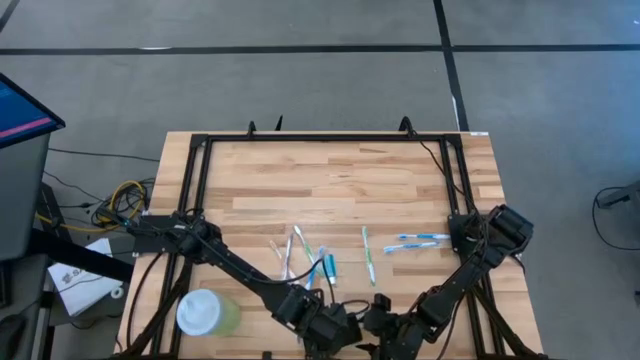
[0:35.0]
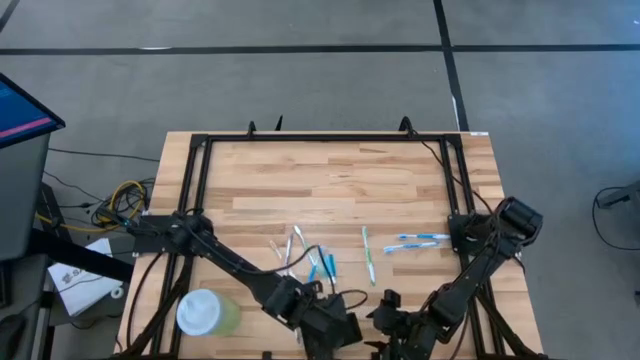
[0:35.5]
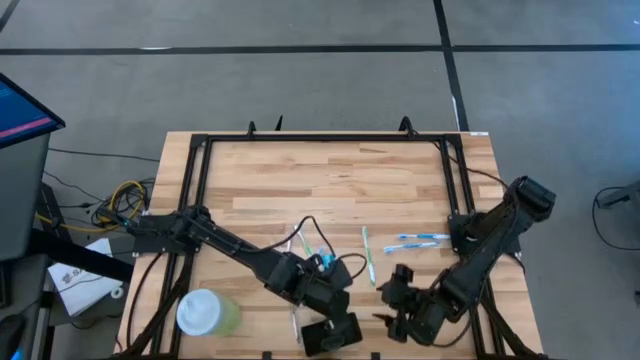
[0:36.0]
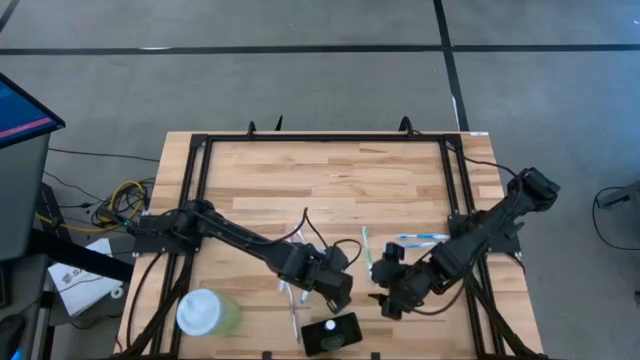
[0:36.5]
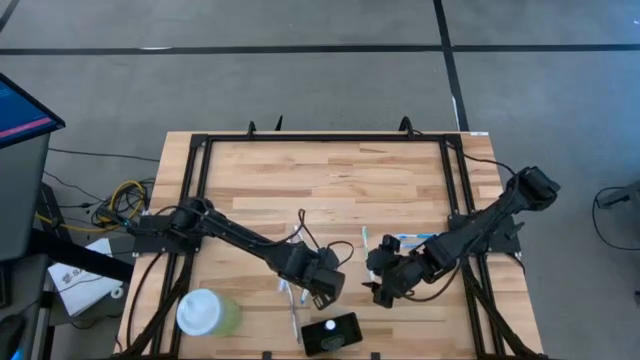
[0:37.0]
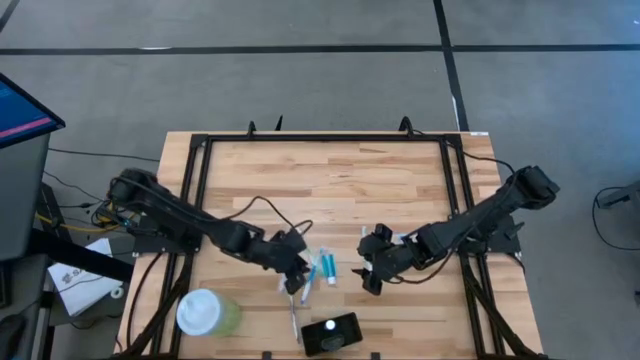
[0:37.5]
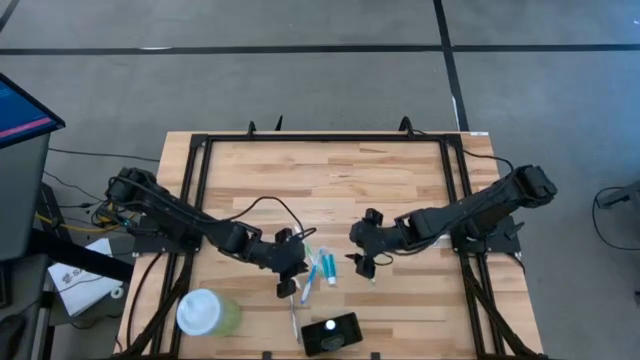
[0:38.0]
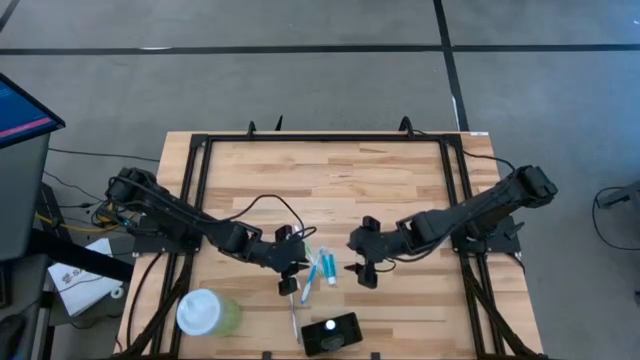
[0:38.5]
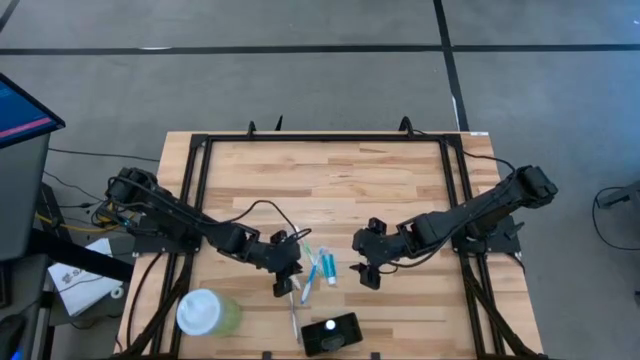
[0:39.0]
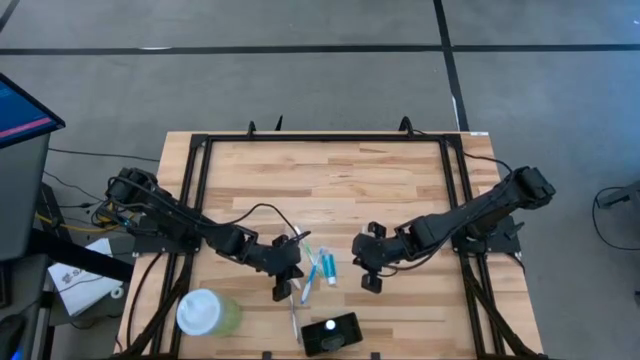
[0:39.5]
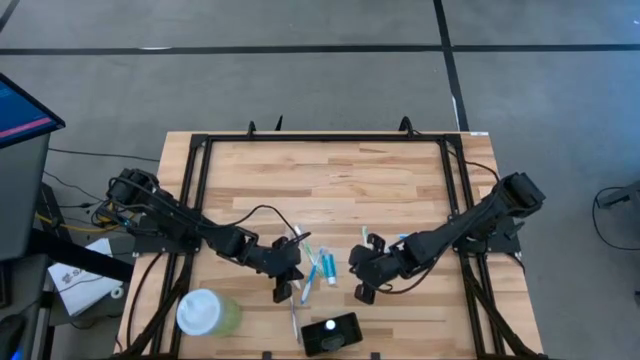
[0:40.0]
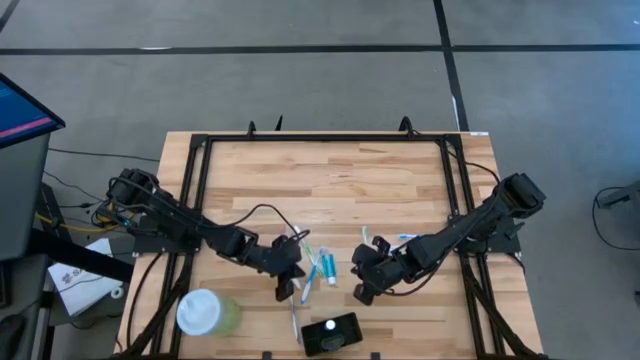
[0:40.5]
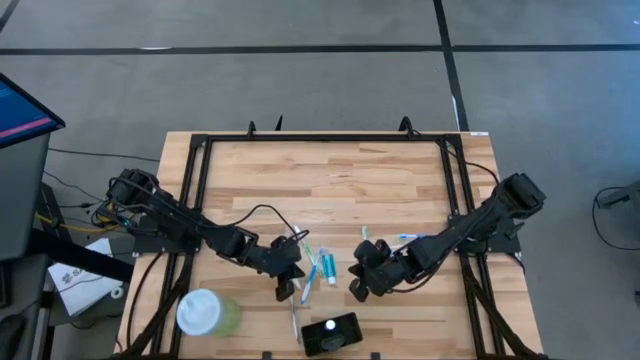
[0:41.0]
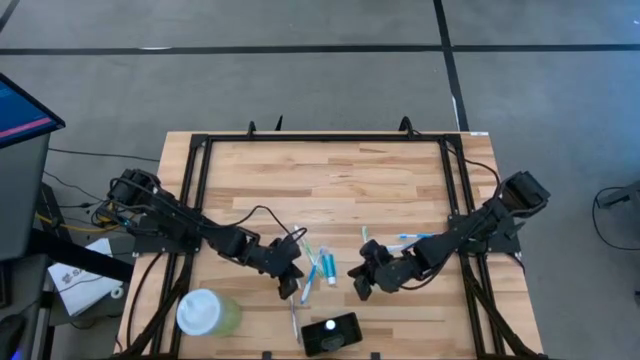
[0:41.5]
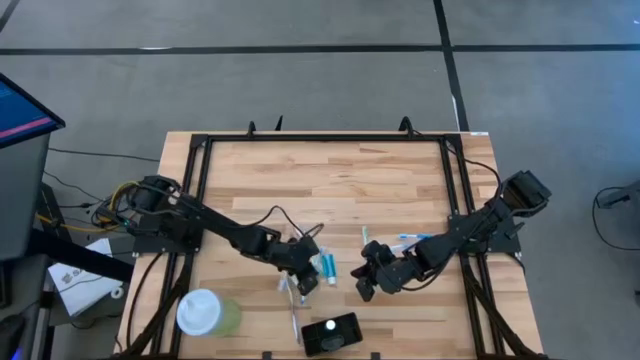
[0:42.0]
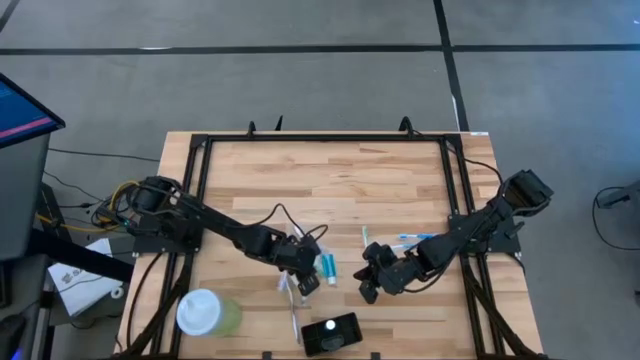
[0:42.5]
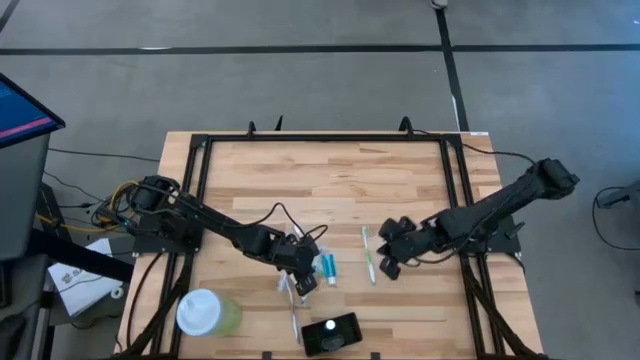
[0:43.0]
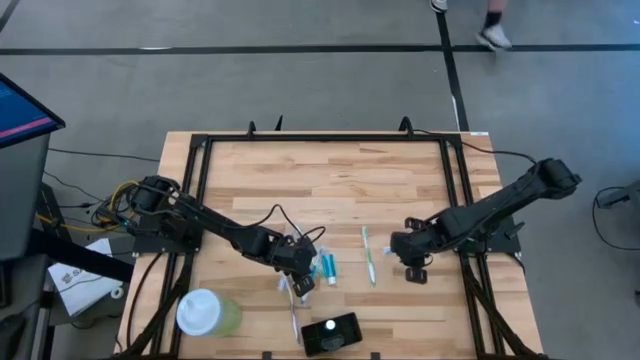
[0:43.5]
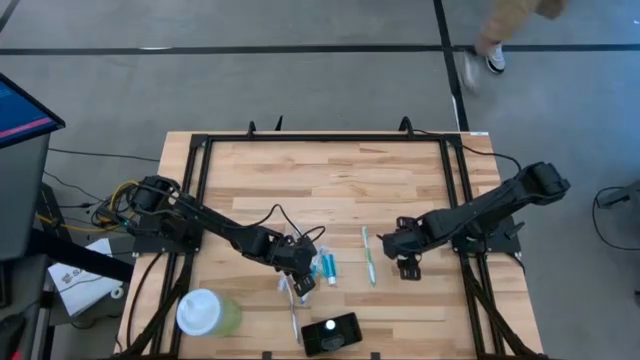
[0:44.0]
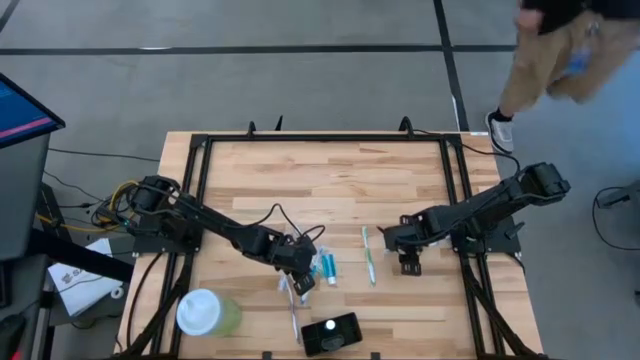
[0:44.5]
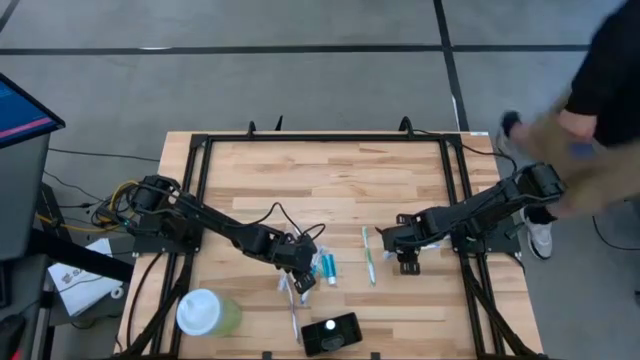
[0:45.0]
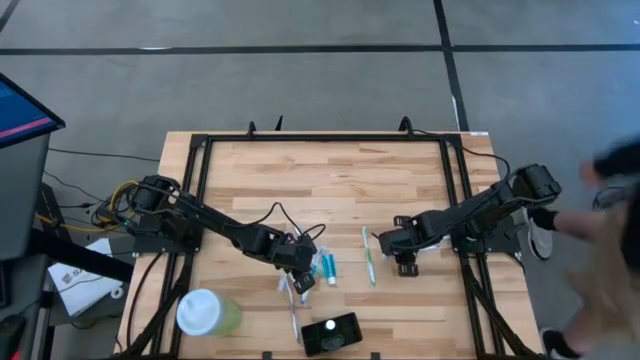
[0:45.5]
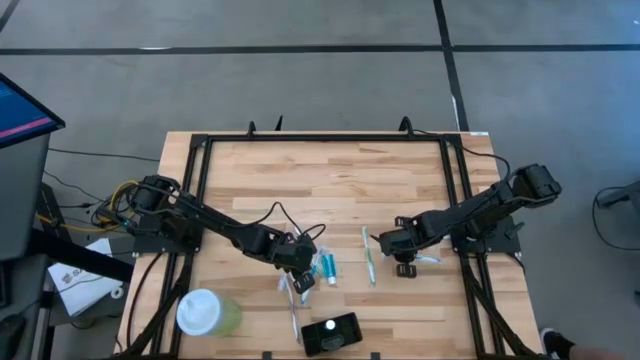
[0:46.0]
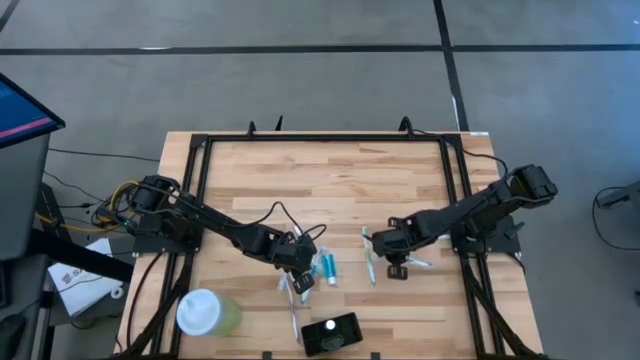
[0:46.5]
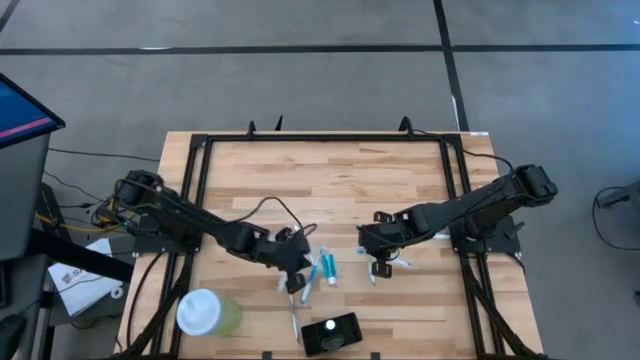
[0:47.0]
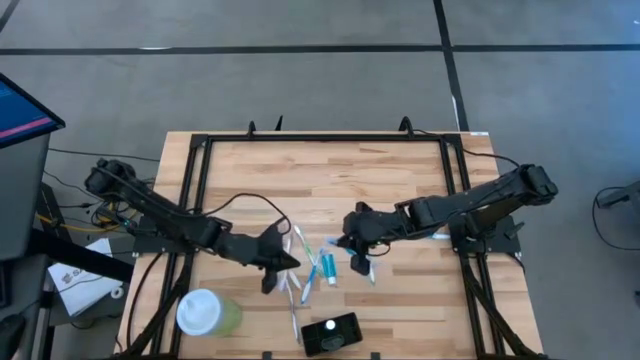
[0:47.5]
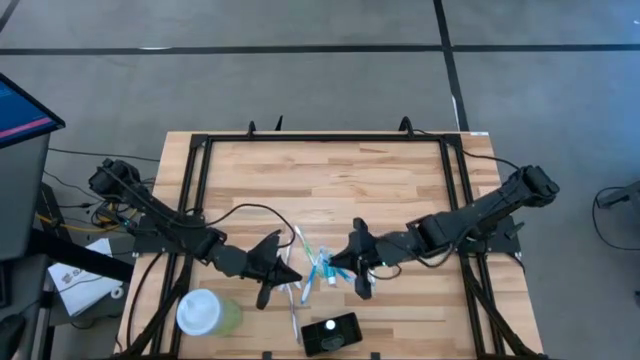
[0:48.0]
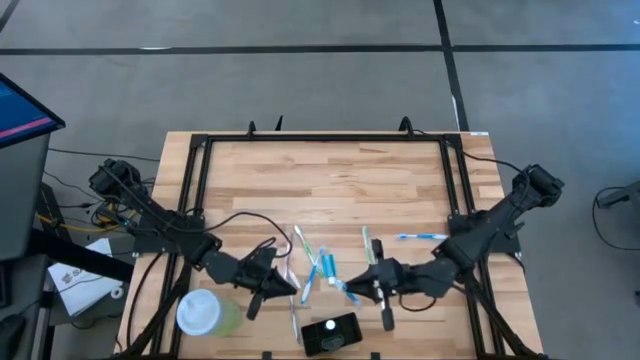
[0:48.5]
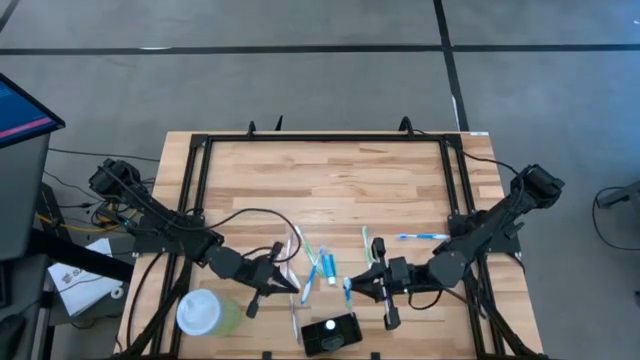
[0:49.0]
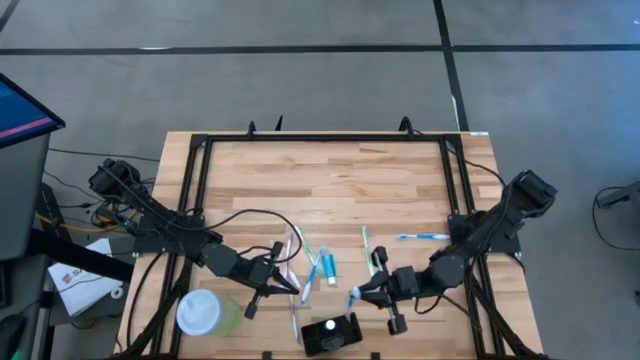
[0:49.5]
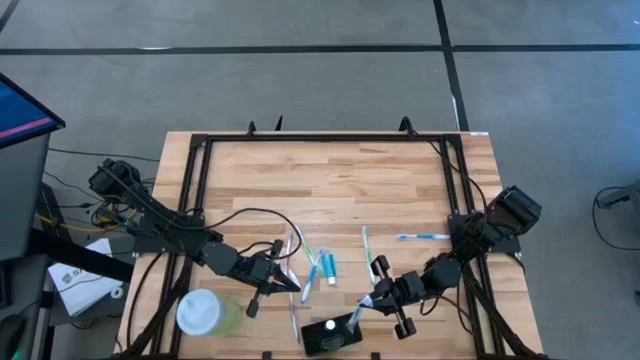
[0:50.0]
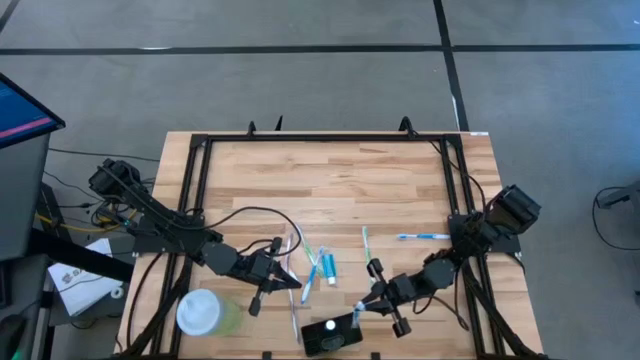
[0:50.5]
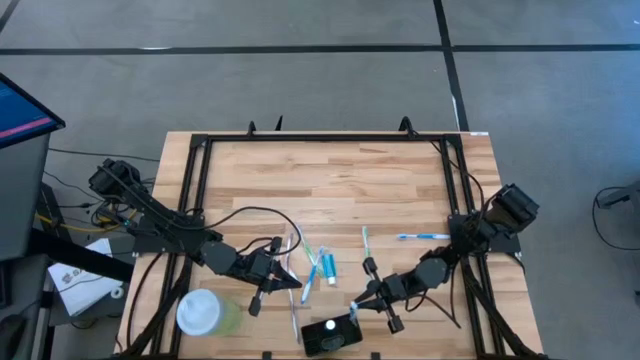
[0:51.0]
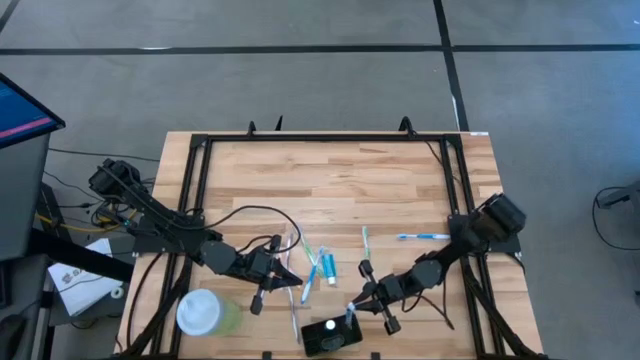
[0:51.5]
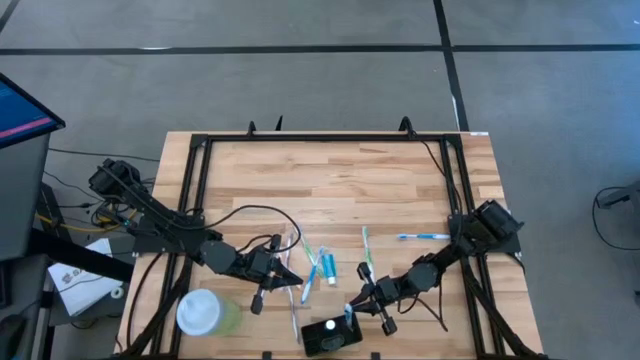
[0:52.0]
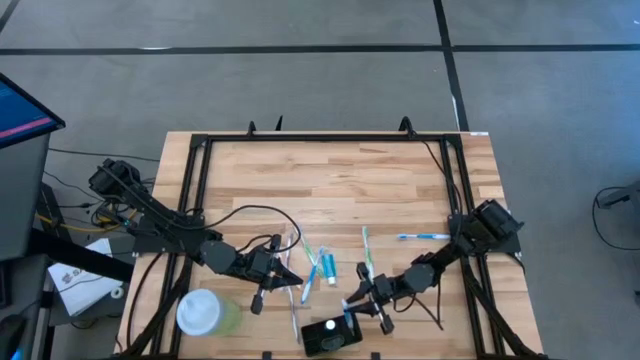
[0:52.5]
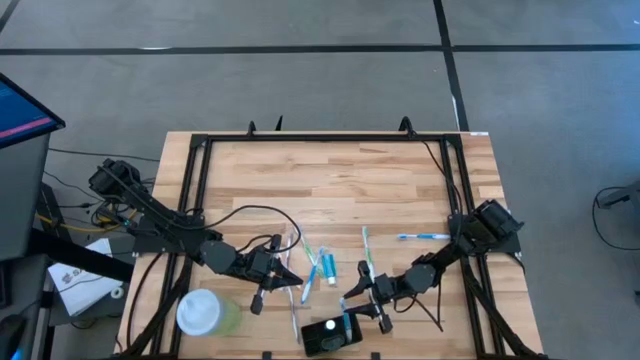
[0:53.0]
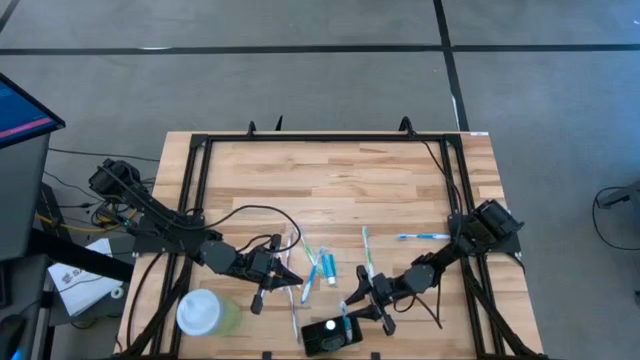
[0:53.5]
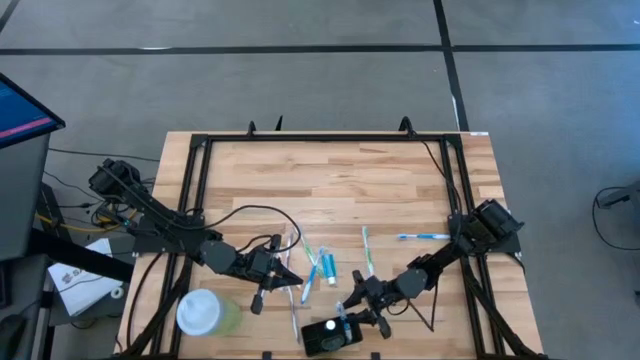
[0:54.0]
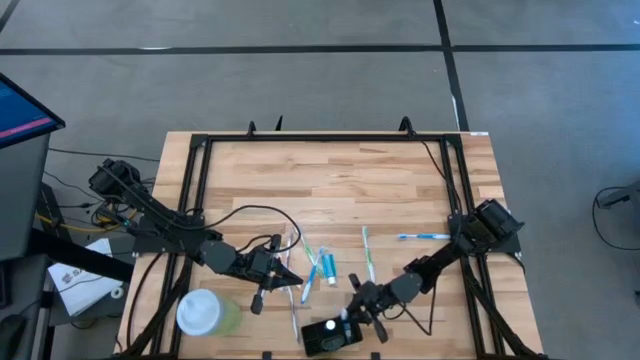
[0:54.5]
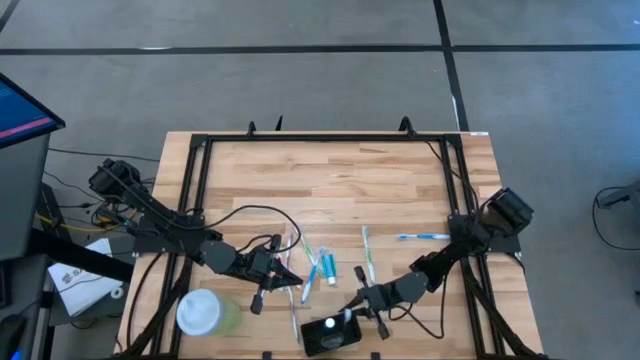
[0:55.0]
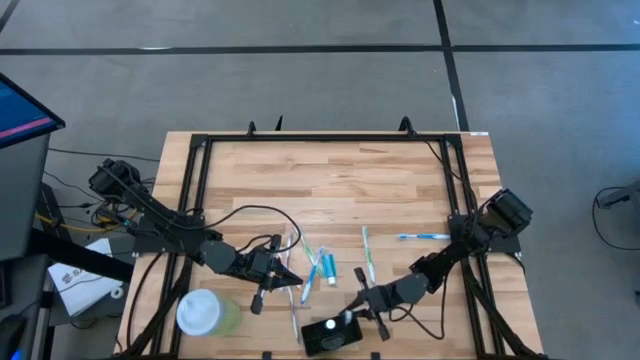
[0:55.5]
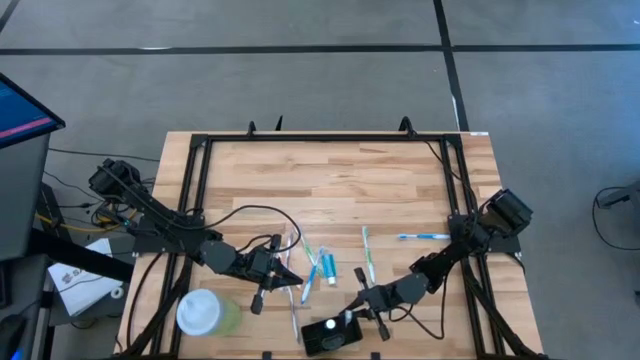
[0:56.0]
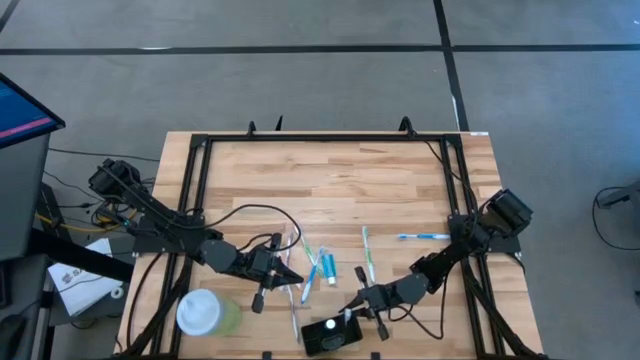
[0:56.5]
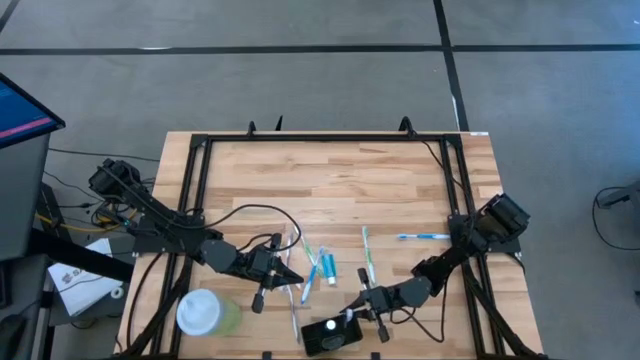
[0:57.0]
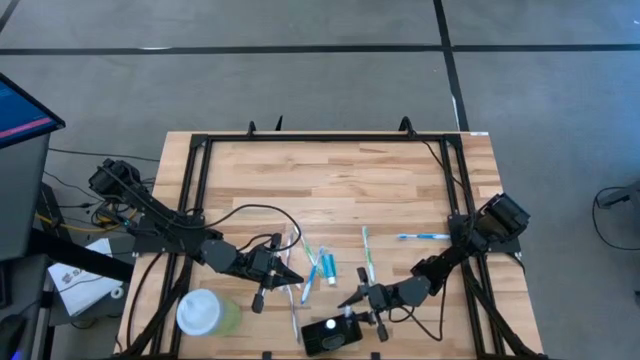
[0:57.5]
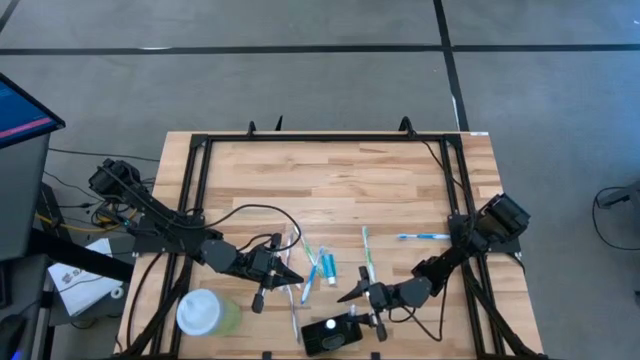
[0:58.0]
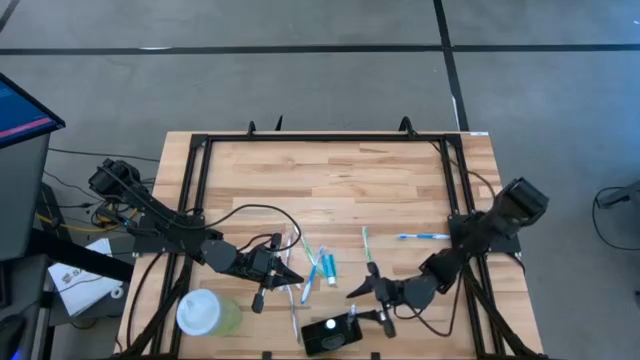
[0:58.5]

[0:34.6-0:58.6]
Task: Pick & Place toothbrushing station
Put the middle blue toothbrush into the black wire organizer
